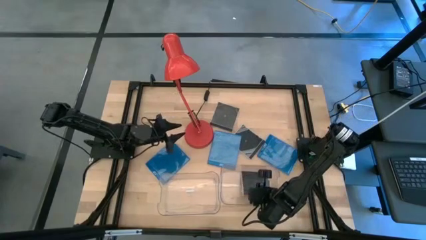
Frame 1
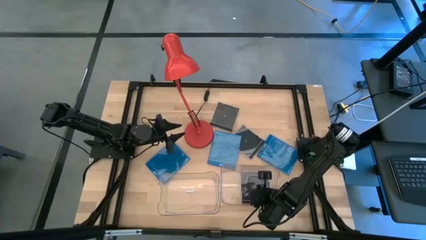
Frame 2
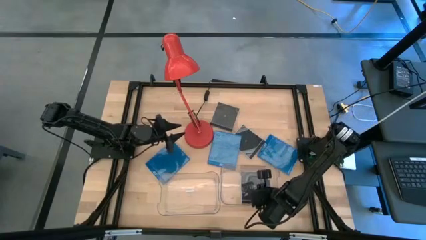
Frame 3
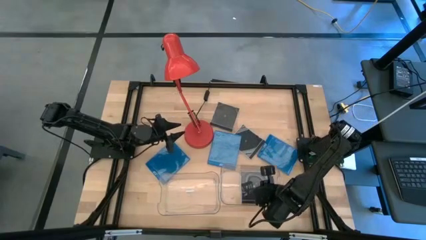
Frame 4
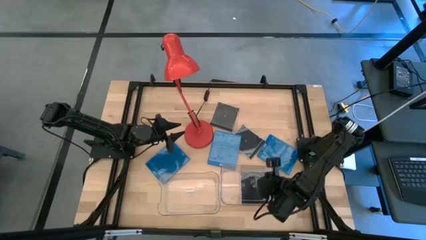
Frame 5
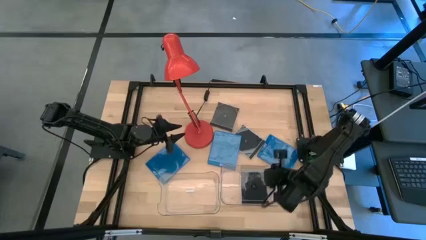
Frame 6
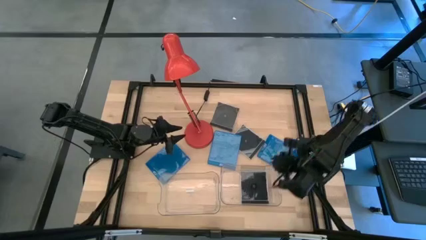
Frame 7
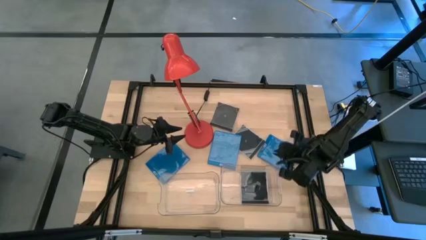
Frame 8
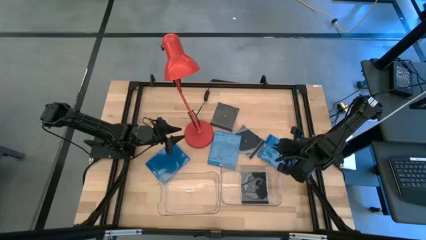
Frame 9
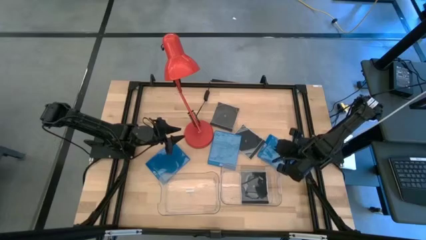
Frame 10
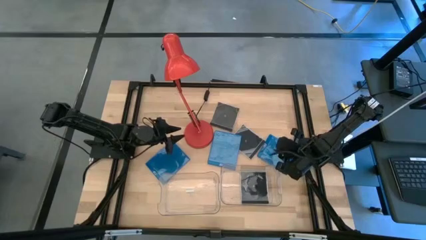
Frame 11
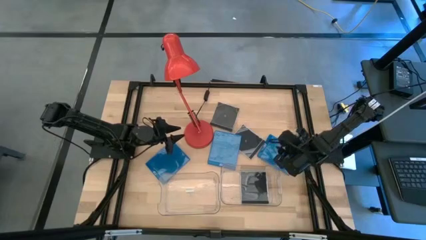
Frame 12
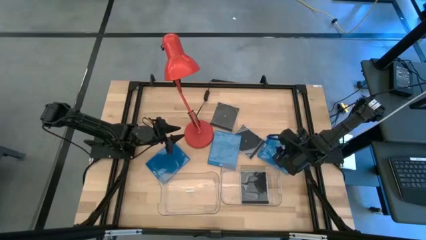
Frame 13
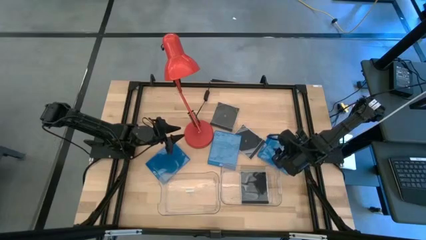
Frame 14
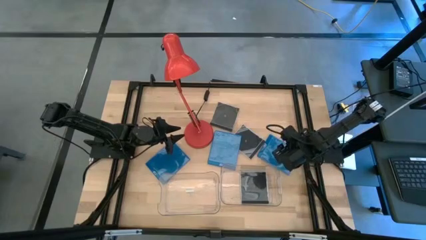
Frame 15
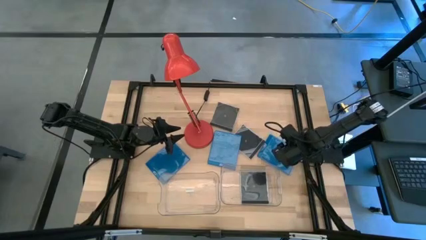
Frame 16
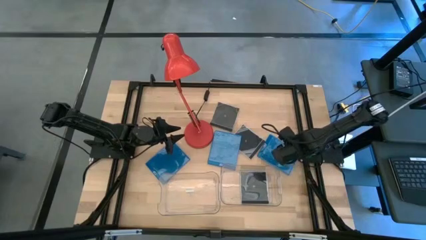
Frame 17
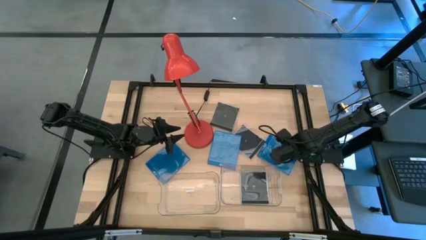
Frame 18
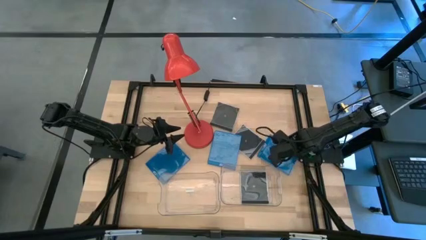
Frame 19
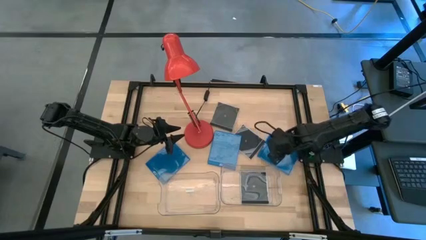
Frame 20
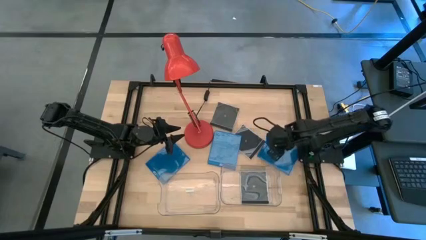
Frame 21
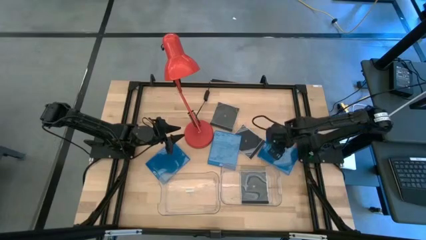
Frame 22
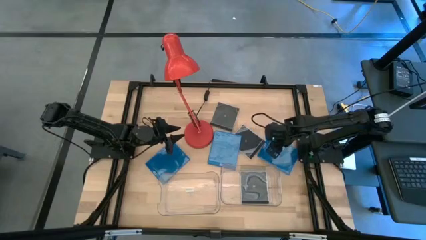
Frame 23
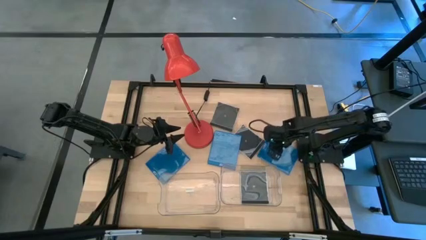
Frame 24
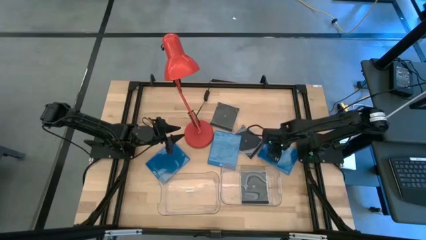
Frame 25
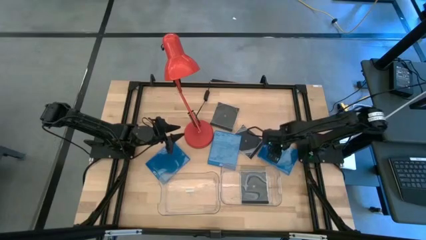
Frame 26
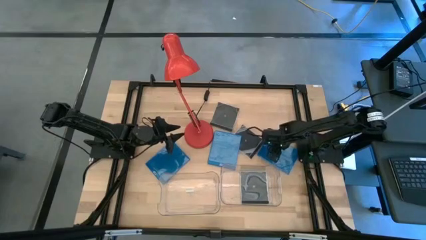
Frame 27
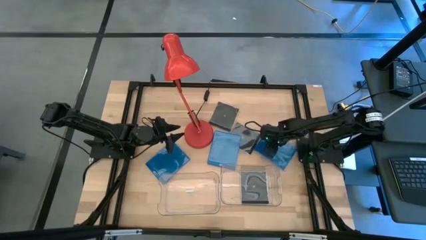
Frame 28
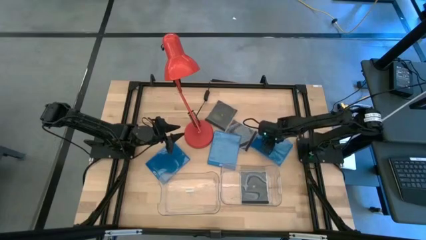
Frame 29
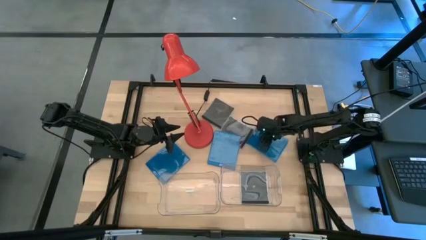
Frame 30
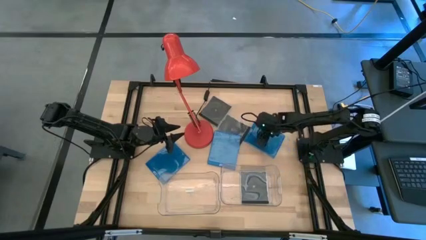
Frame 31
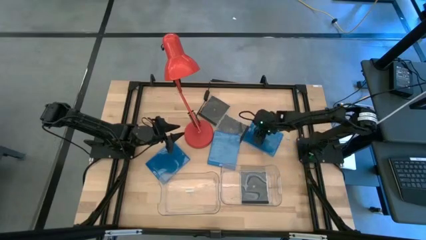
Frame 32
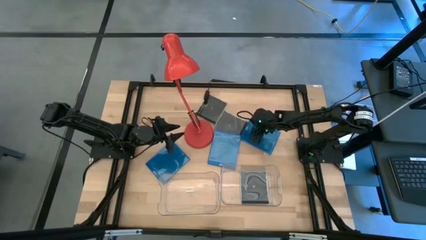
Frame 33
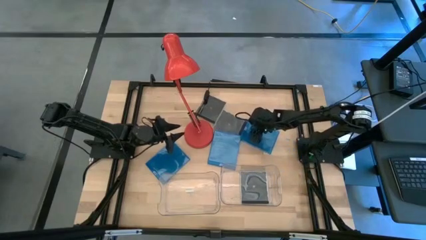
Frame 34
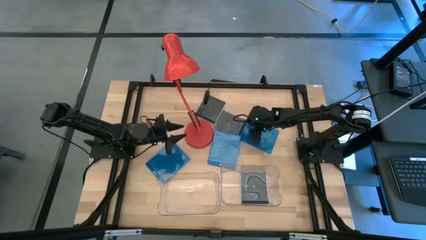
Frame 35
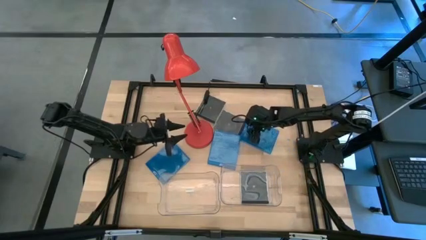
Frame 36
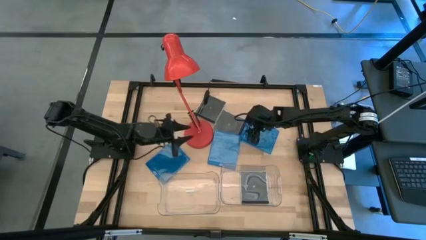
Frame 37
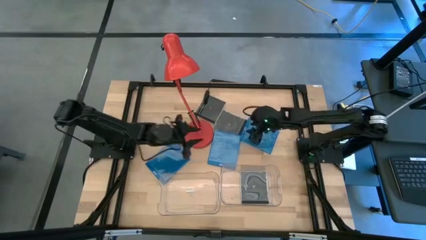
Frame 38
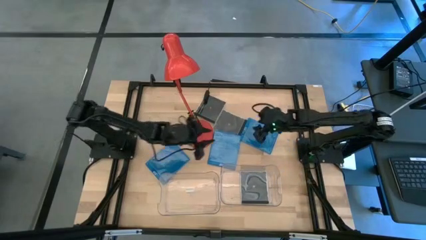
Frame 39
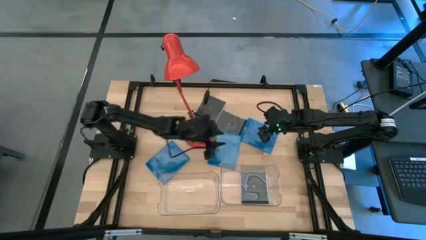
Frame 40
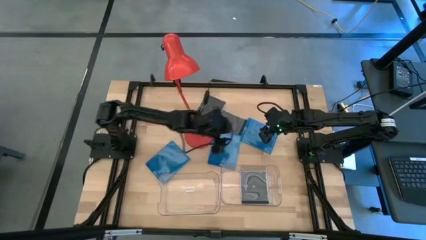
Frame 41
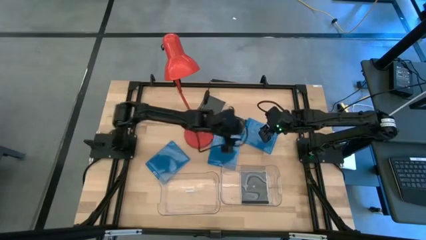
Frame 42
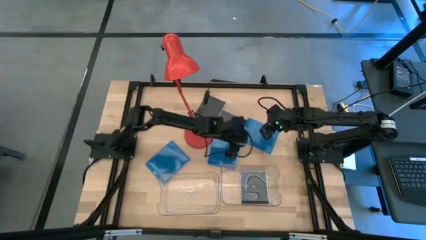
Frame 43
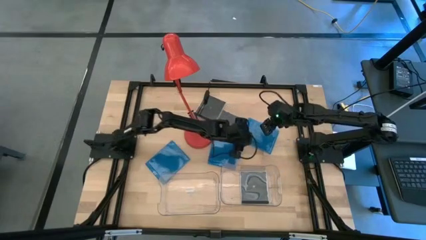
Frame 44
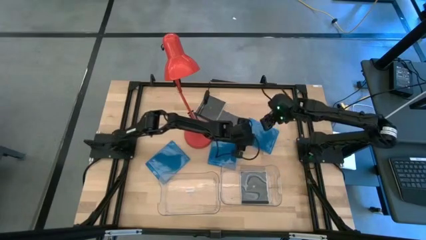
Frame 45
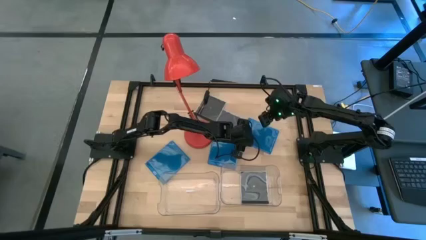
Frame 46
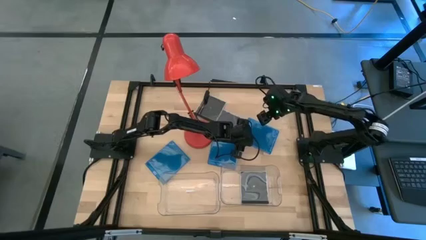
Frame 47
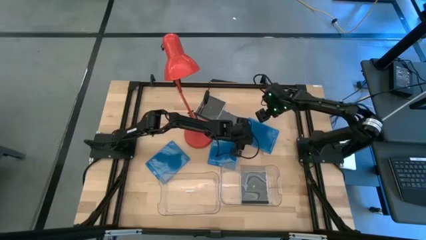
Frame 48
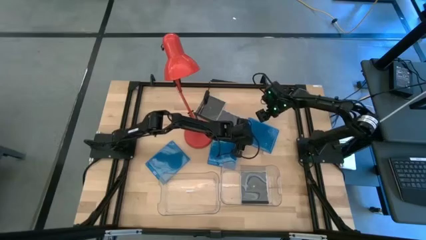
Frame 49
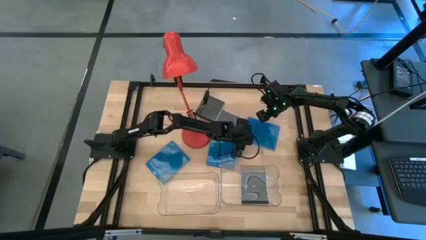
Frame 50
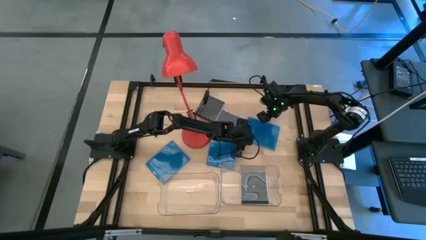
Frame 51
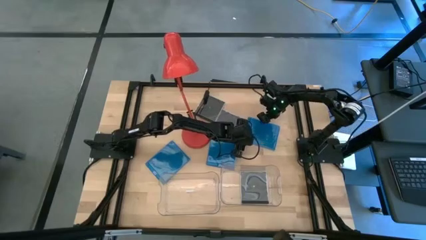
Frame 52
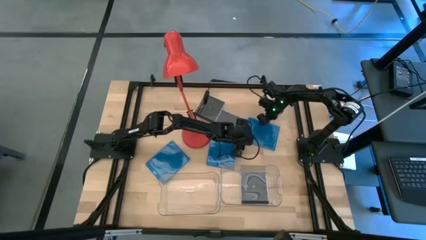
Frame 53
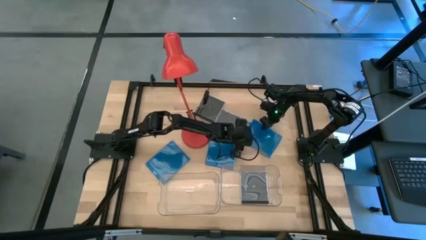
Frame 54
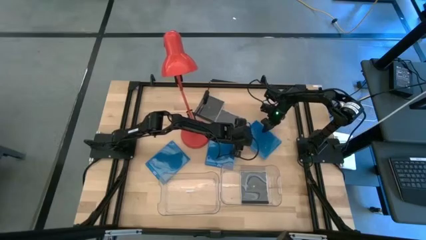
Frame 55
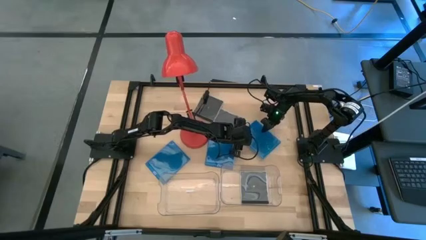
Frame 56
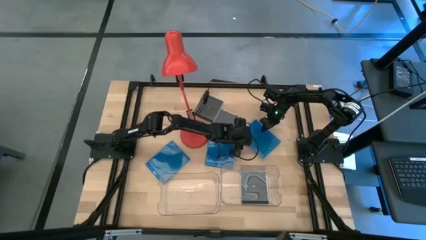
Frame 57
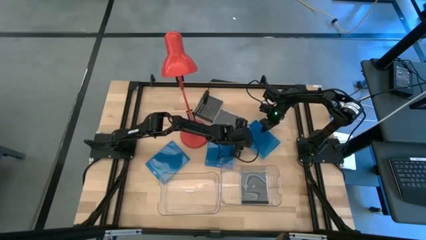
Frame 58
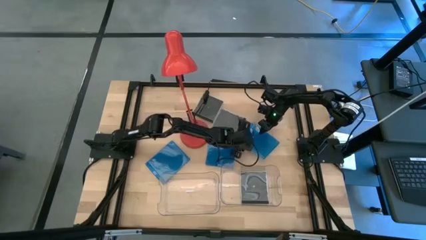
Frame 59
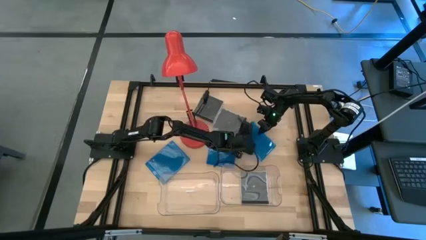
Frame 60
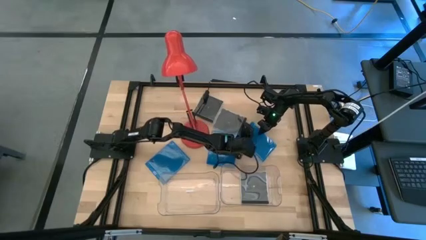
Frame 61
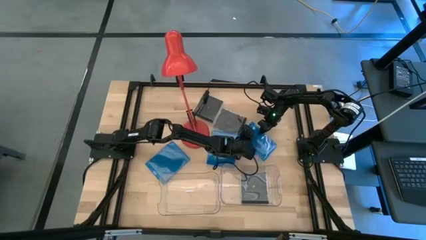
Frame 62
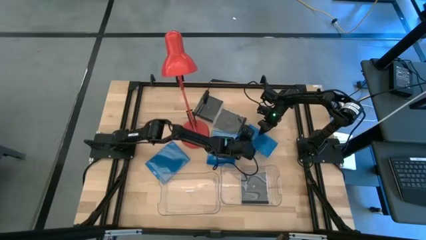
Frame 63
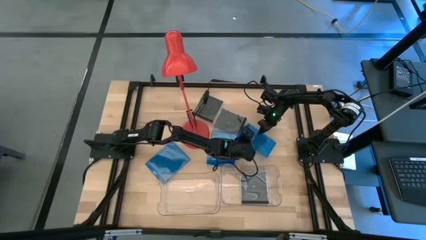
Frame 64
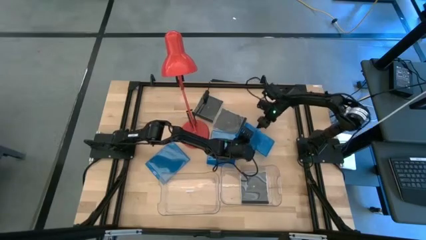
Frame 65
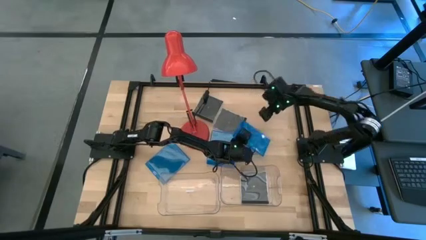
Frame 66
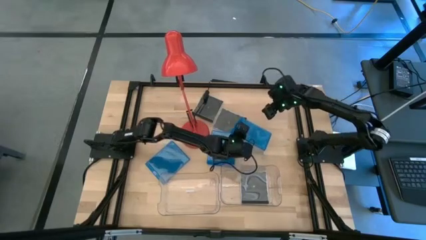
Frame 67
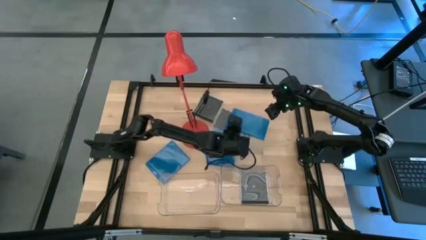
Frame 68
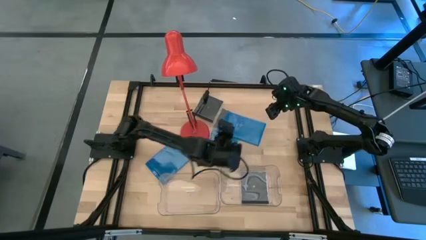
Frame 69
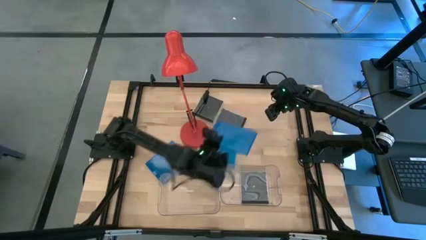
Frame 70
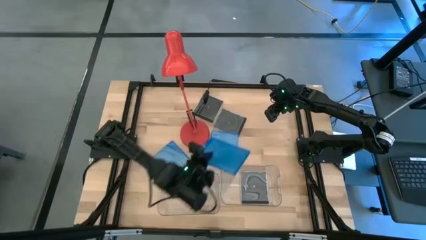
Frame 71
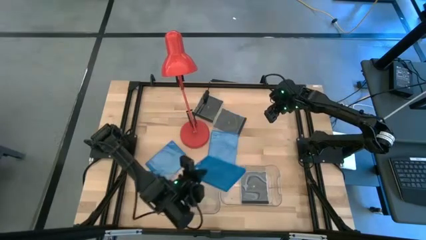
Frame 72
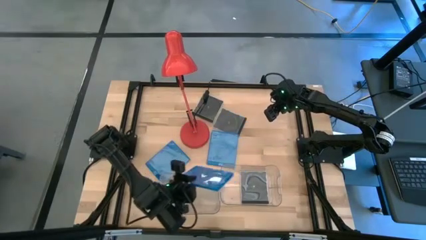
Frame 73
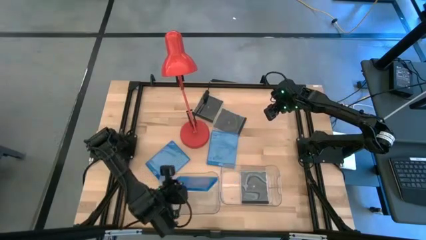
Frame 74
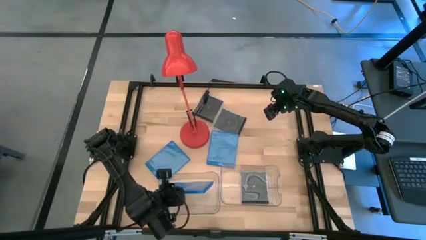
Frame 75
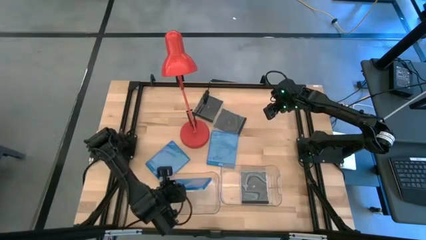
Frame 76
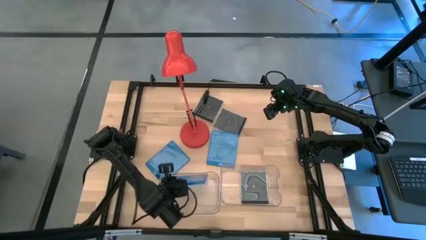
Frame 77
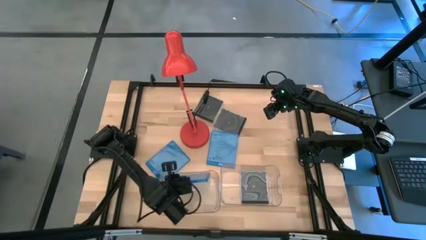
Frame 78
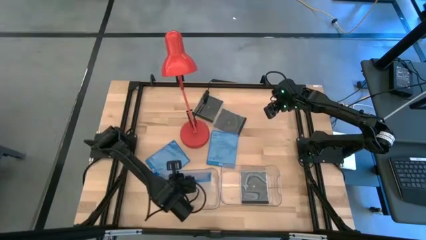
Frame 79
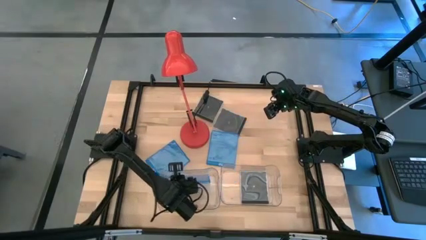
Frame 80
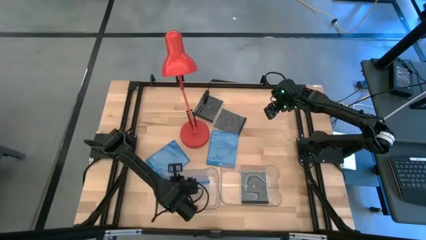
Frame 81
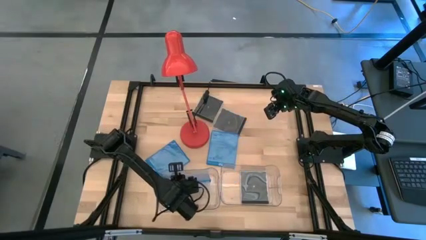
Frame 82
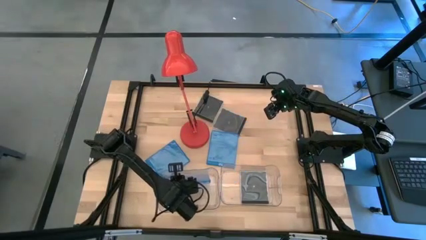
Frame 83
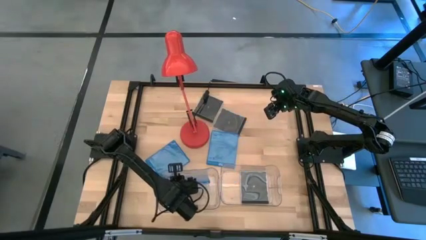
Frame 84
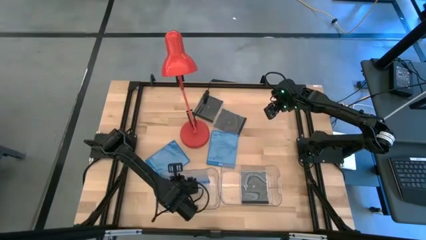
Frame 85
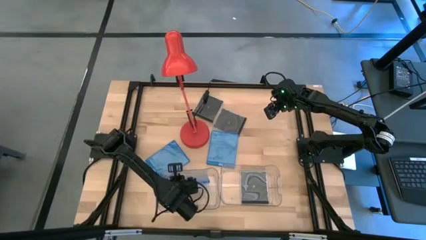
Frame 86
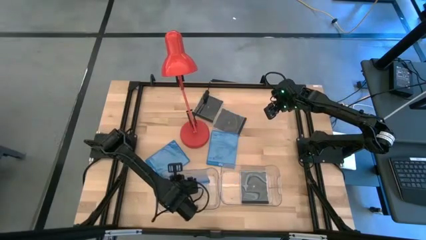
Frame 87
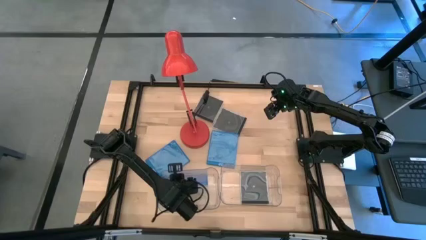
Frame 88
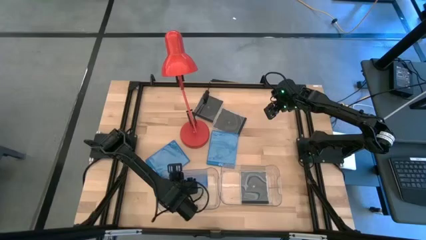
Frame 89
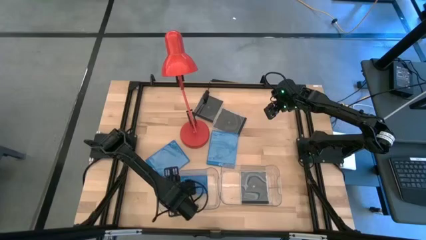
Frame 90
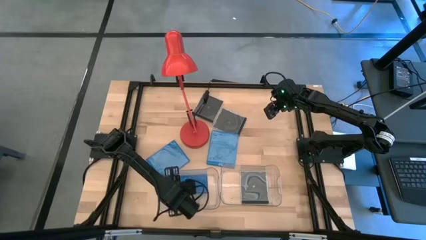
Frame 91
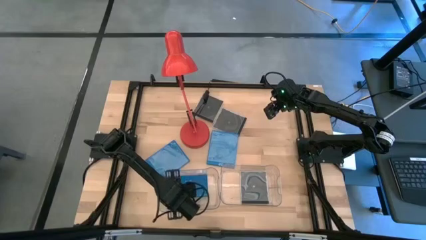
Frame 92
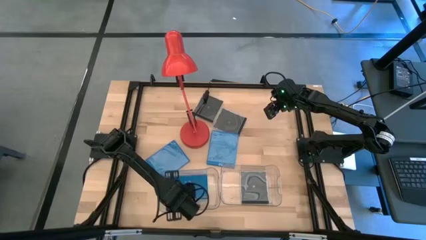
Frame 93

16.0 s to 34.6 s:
Task: Pick & place jewel cases by type
Put the right blue cd case into the left transparent bin
